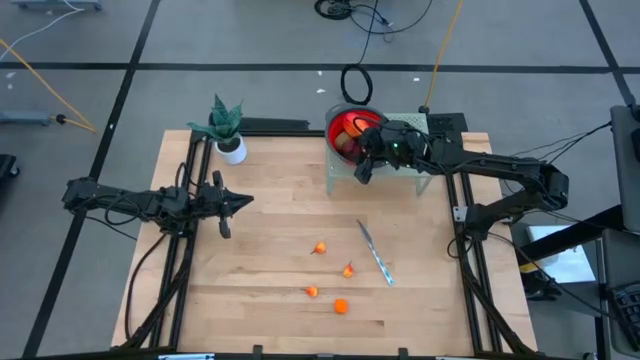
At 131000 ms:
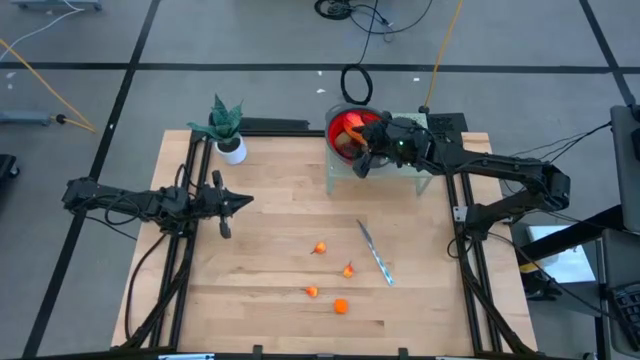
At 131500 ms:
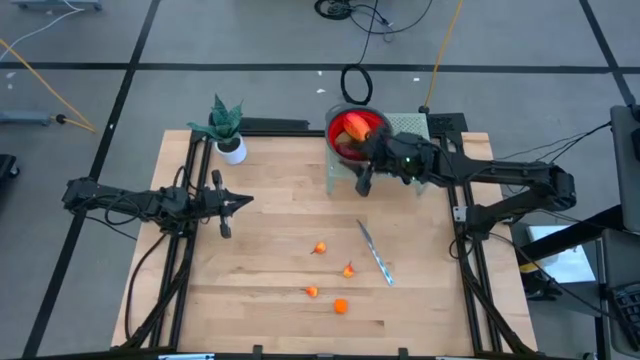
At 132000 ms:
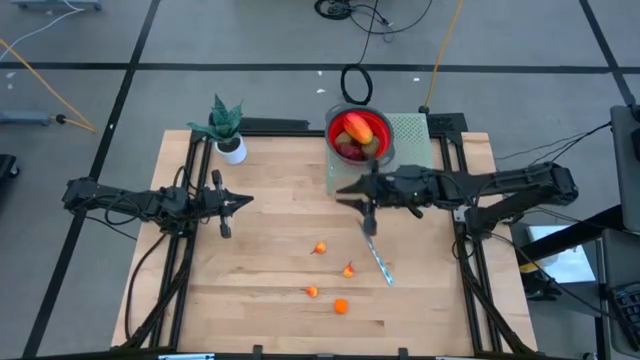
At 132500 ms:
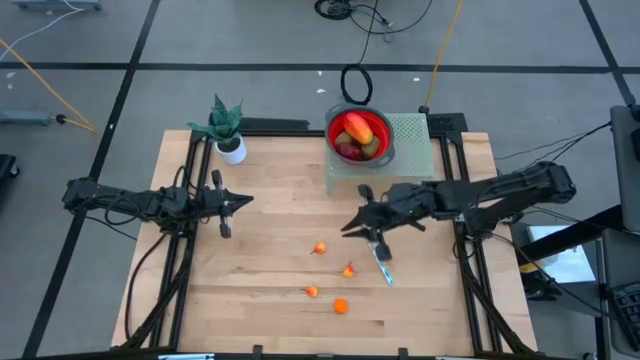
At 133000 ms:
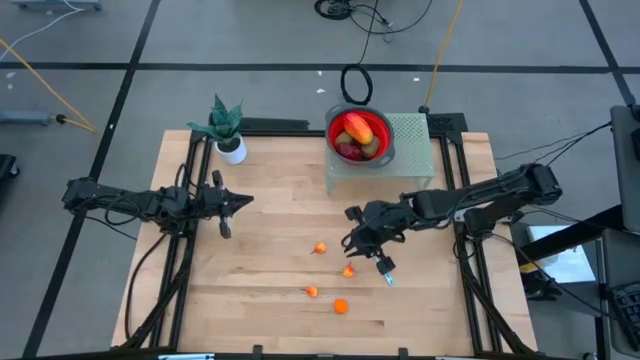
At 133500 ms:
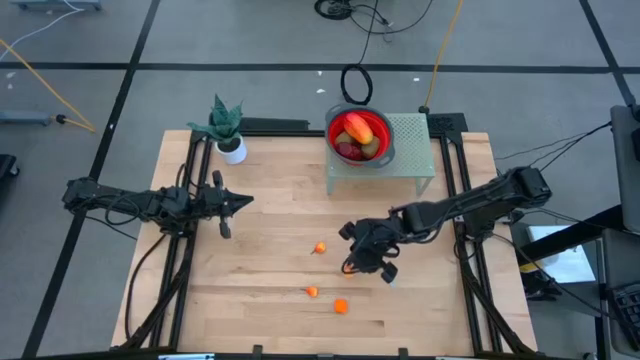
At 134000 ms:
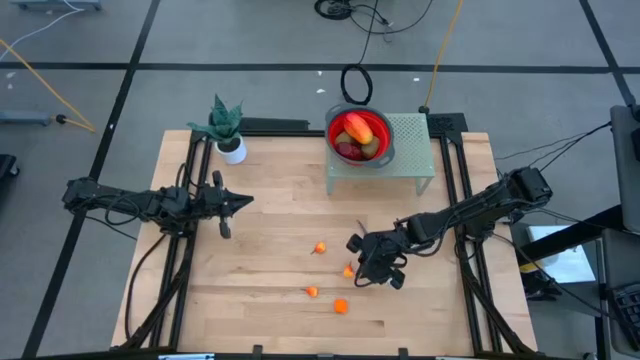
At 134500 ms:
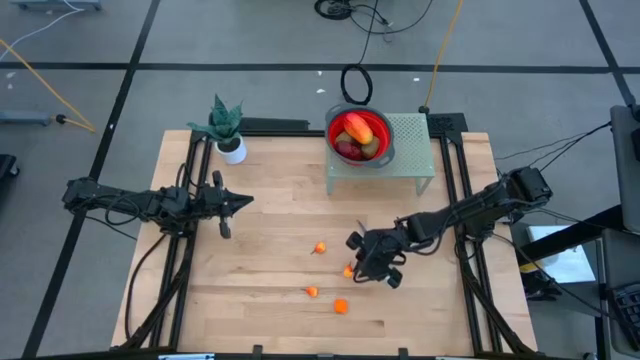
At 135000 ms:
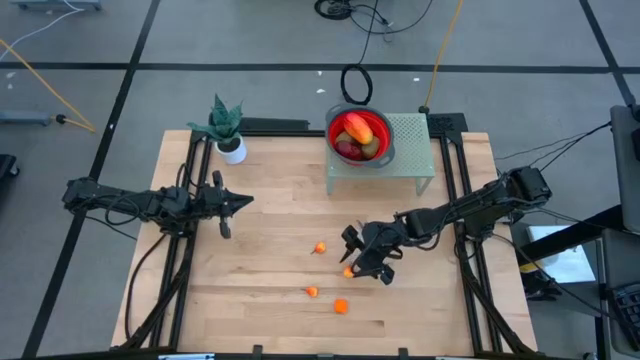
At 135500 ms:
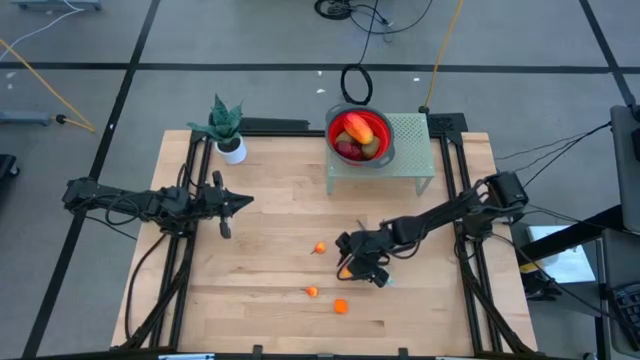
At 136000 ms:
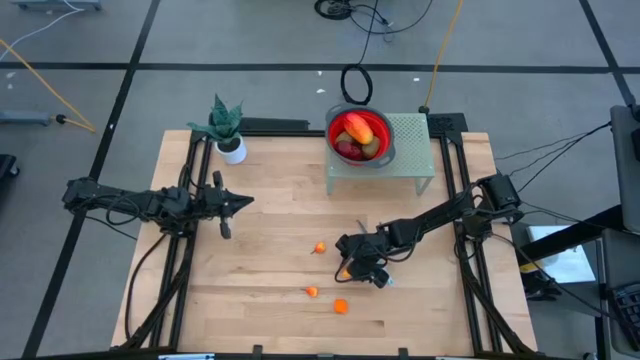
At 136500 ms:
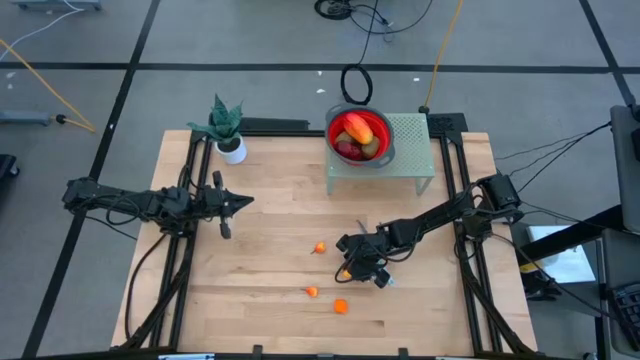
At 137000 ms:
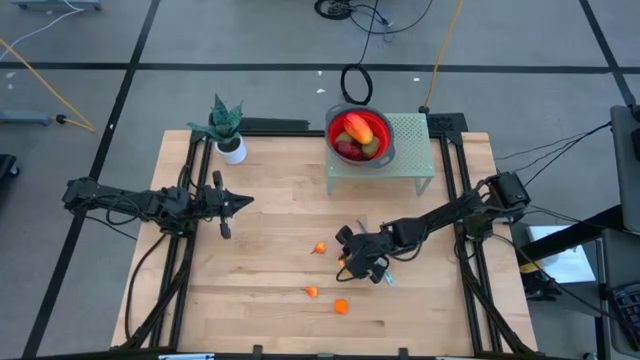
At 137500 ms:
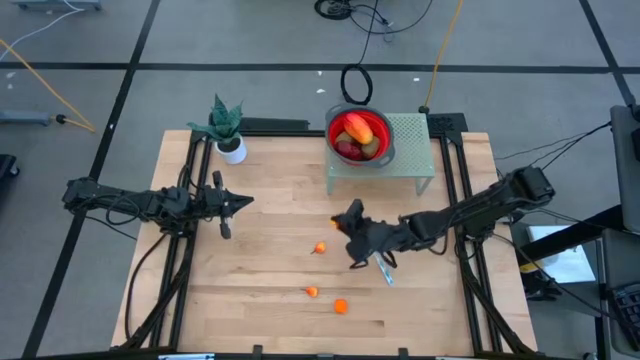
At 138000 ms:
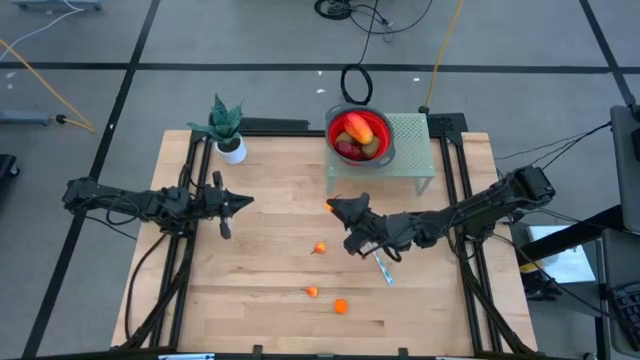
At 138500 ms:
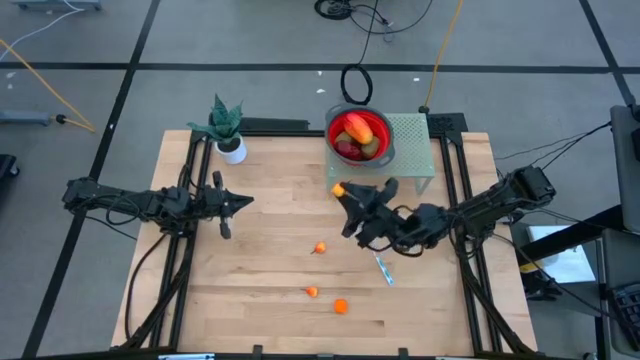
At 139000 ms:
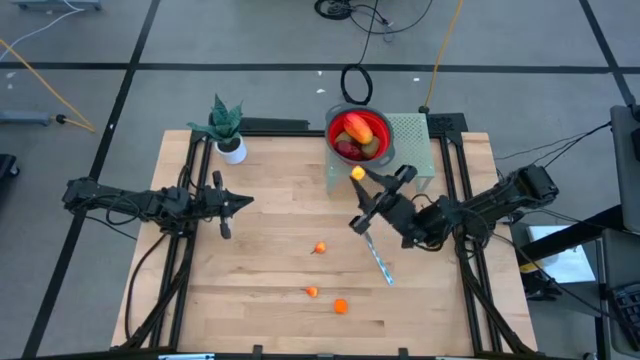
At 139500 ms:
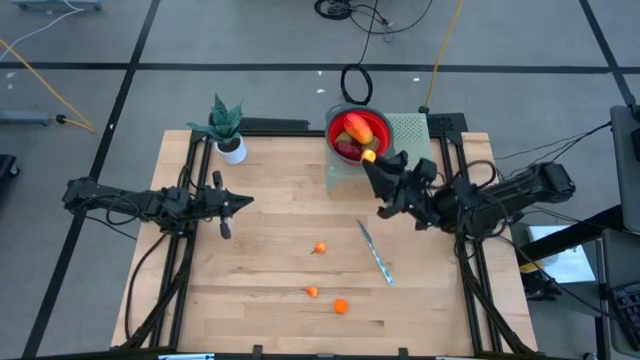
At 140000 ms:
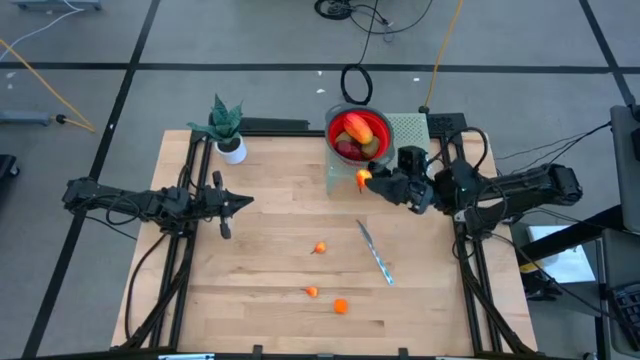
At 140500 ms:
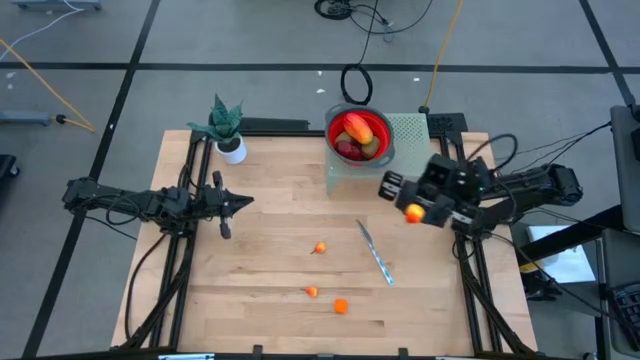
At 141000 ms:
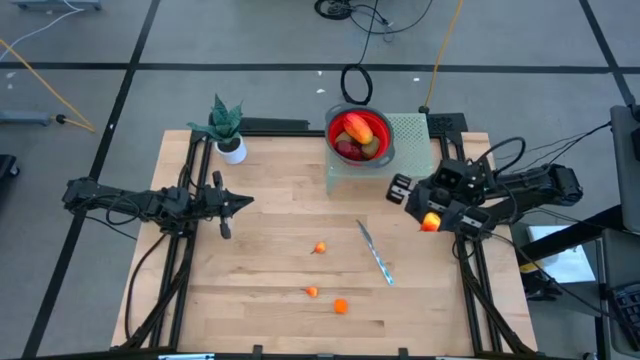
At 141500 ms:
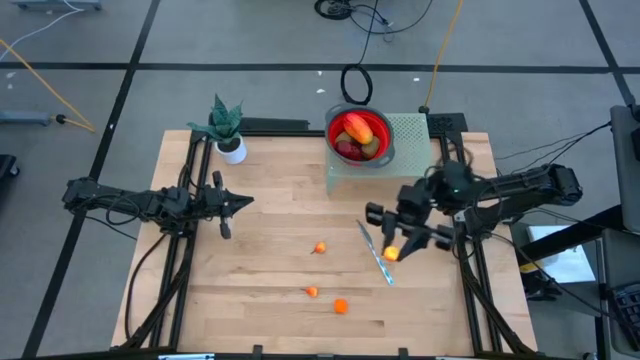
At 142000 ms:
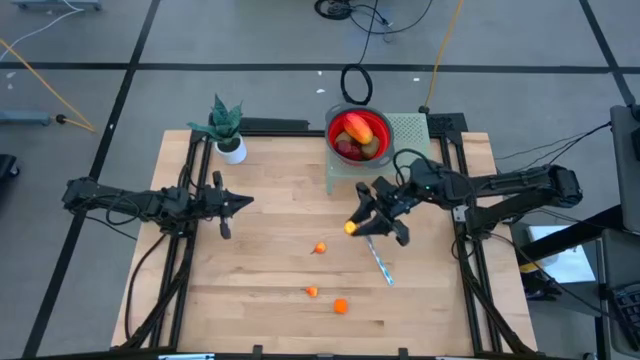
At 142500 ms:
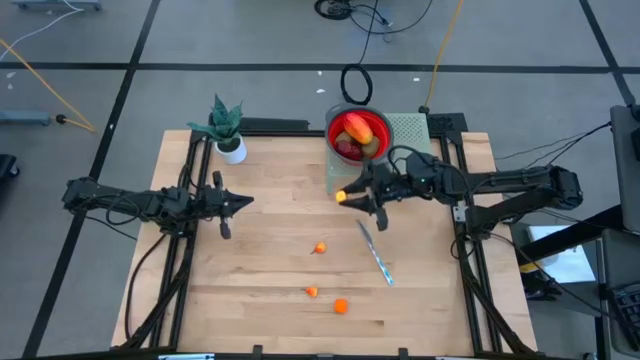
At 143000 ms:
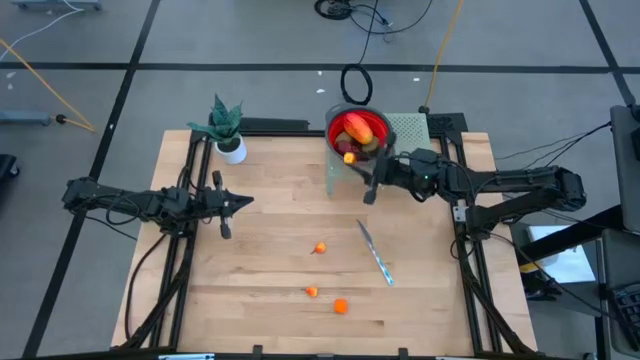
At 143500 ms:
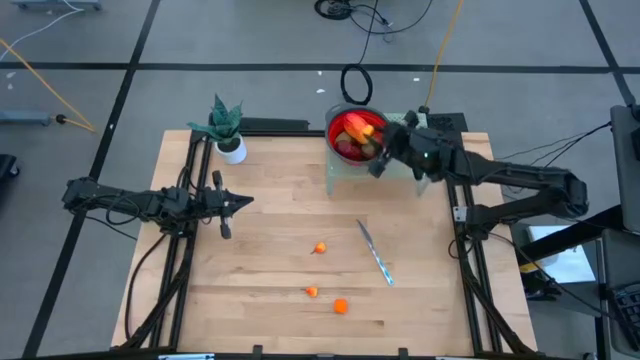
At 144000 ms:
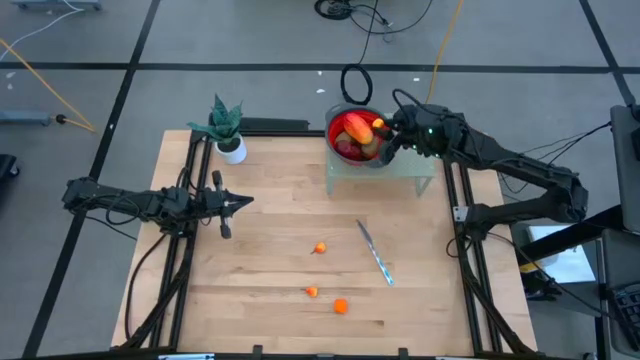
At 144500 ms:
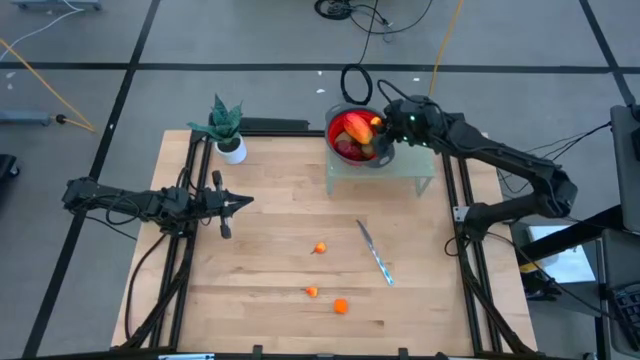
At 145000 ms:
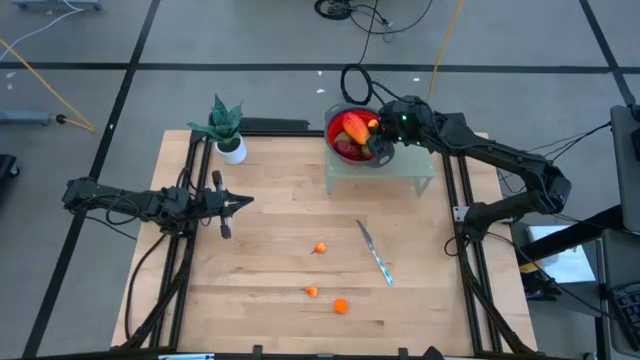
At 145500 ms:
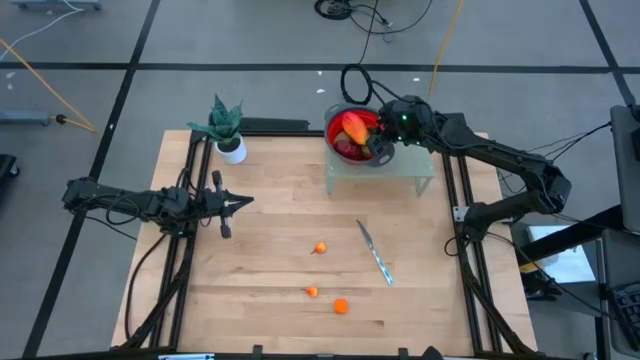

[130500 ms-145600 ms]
Task: Pick & Place Fruit
Put the yellow orange peach into the red basket on the shelf

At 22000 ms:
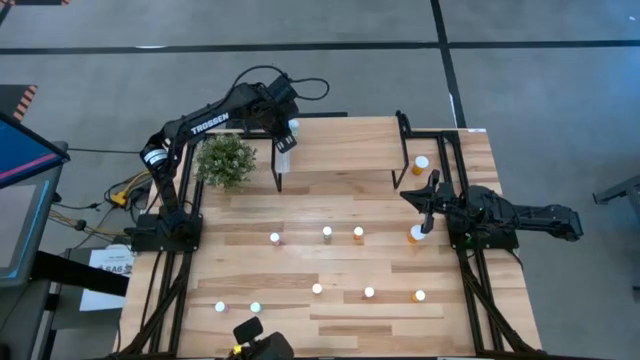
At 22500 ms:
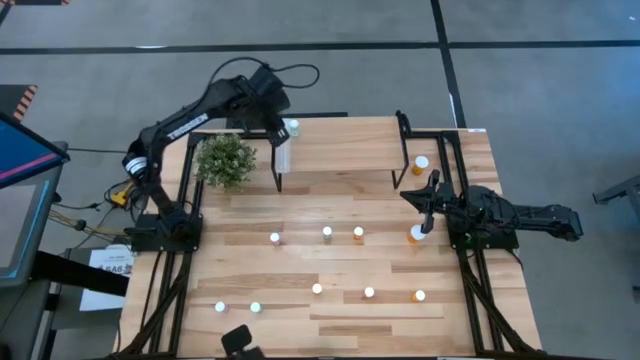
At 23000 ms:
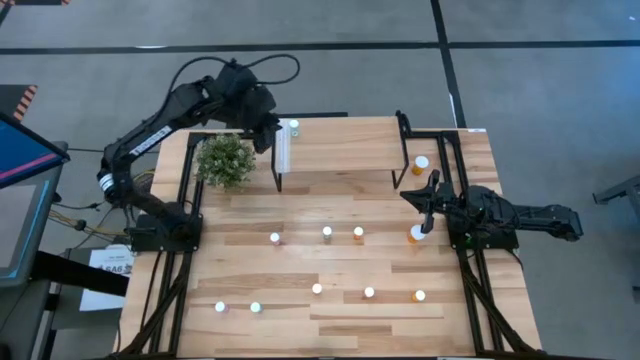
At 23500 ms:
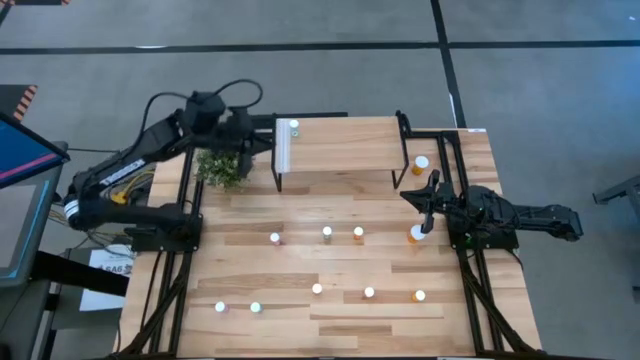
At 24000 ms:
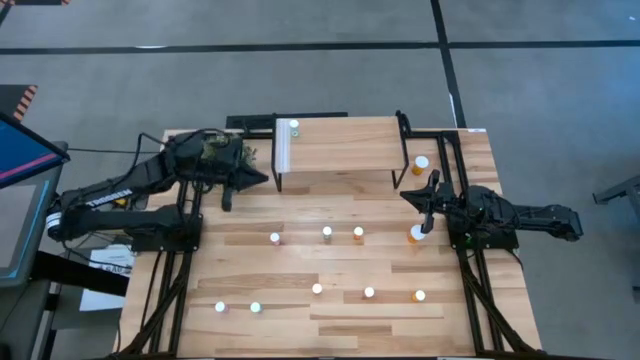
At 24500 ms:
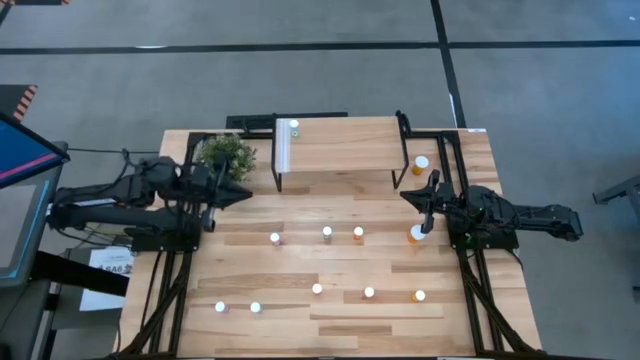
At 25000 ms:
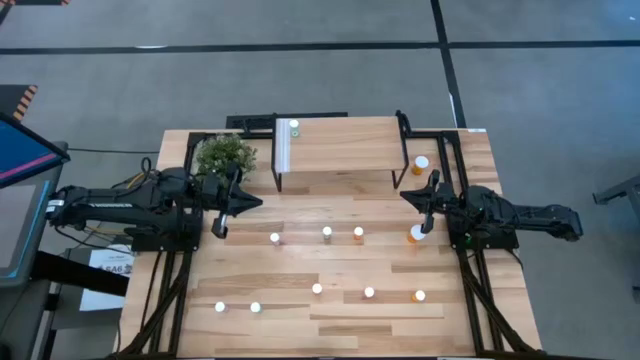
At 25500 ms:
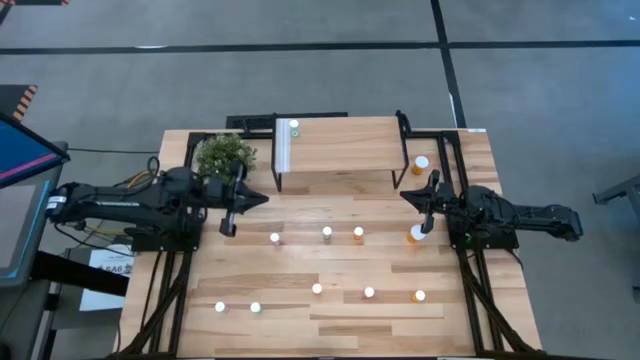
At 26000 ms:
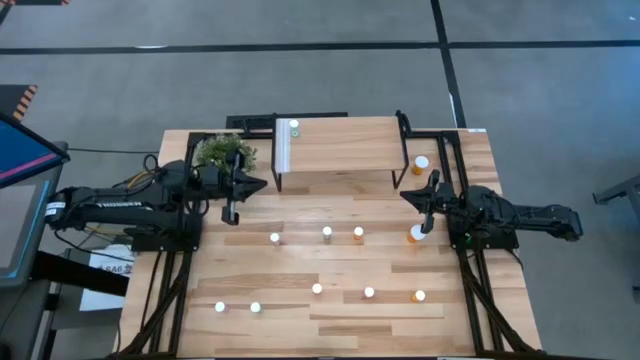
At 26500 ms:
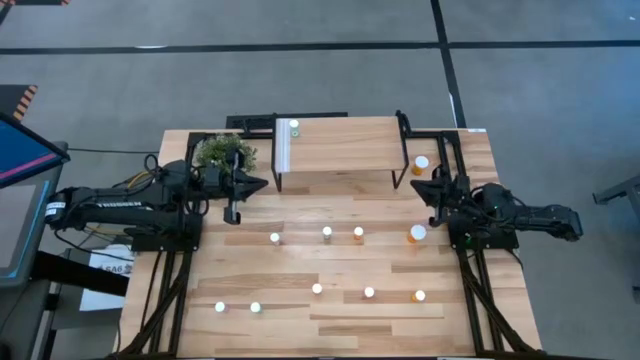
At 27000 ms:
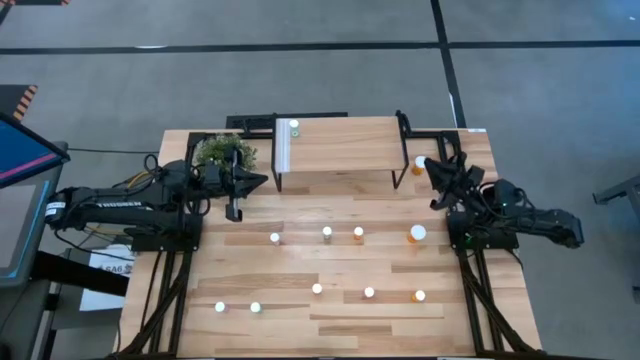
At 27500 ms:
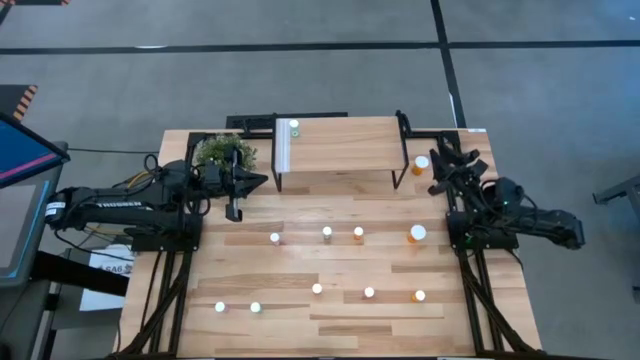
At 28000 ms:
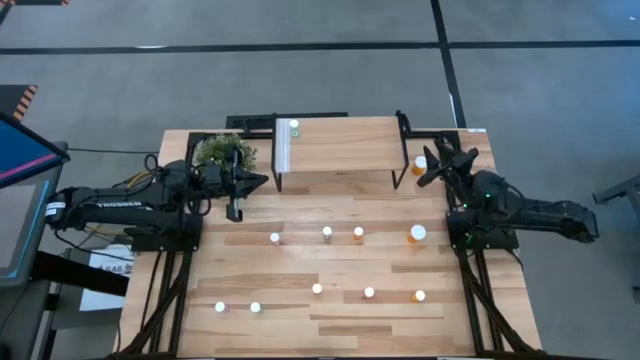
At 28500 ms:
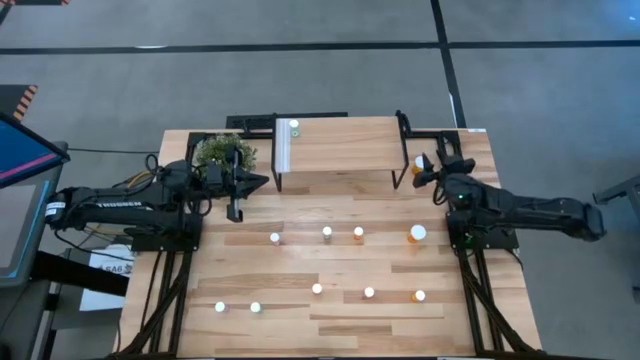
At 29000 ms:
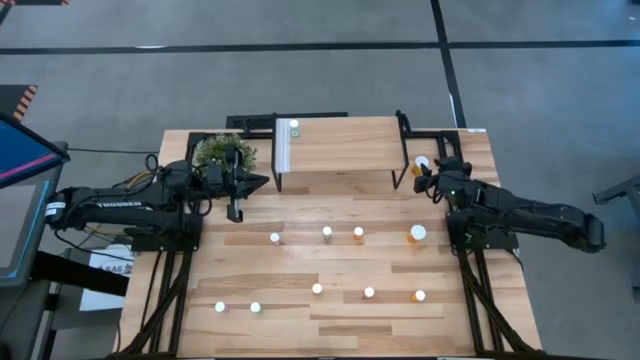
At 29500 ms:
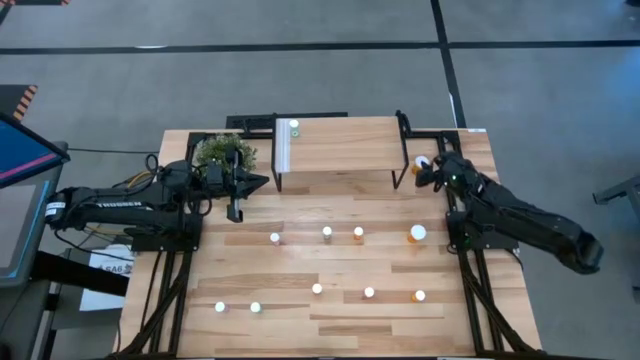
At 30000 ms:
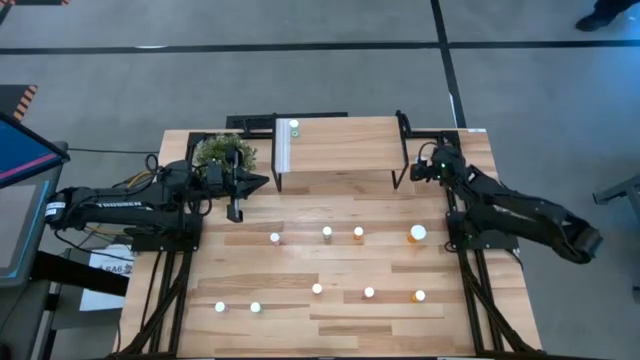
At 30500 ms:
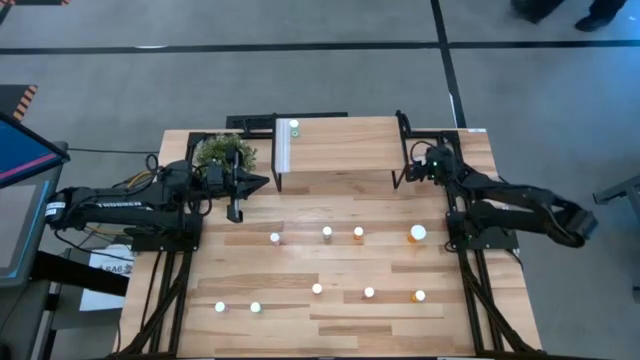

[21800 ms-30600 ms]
Task: Pick and place medicine bottles onto shelf by color
Put the top orange large pill bottle on the shelf
